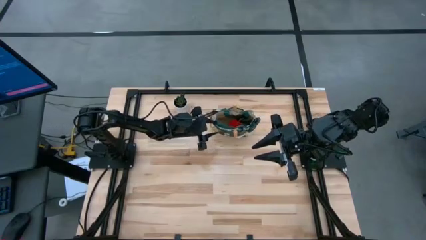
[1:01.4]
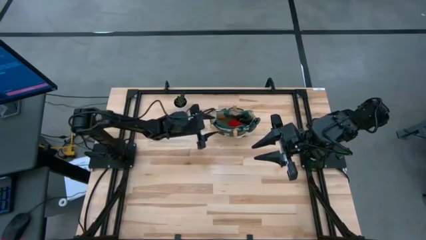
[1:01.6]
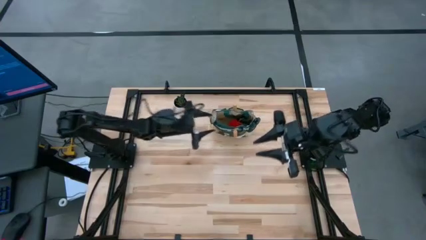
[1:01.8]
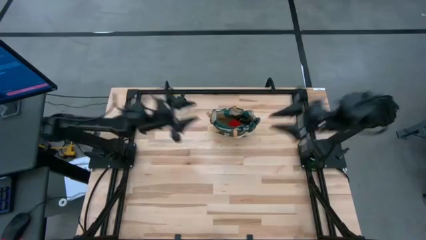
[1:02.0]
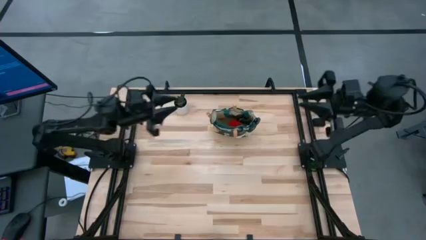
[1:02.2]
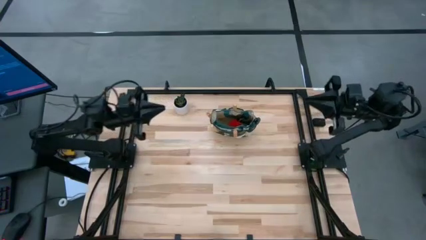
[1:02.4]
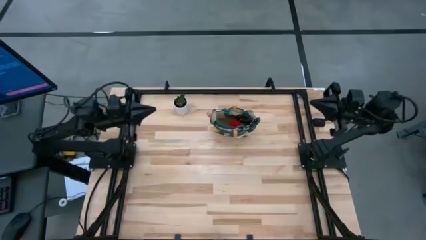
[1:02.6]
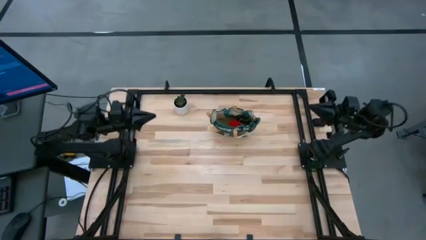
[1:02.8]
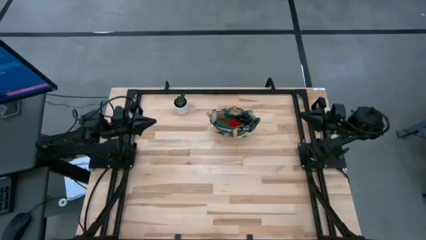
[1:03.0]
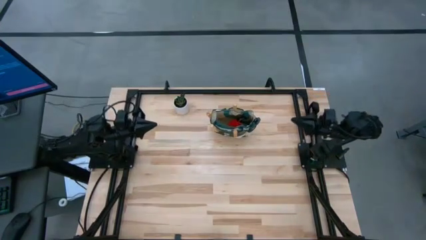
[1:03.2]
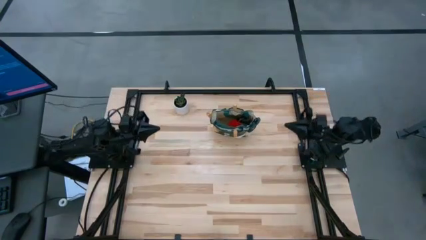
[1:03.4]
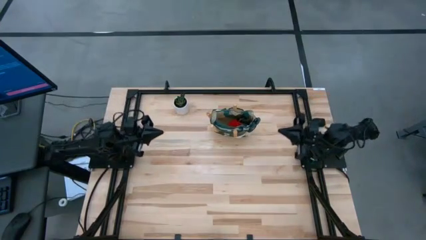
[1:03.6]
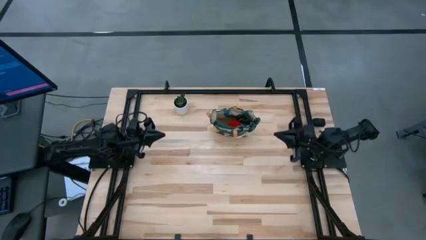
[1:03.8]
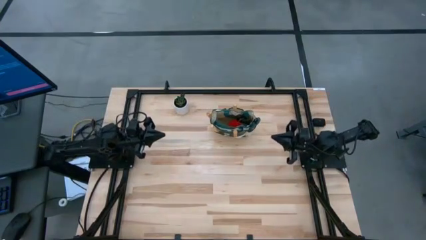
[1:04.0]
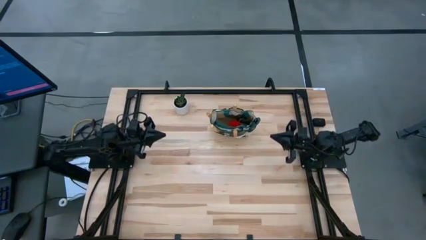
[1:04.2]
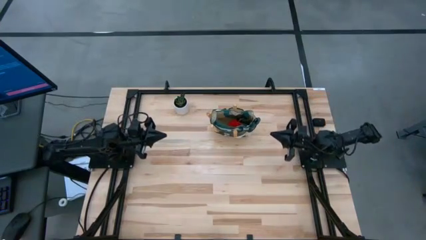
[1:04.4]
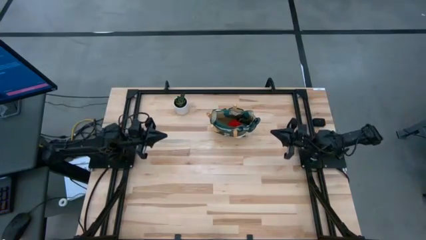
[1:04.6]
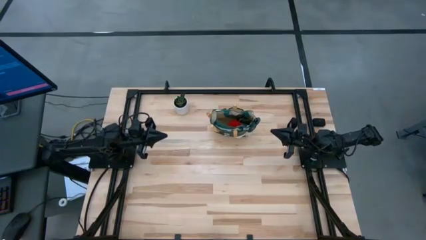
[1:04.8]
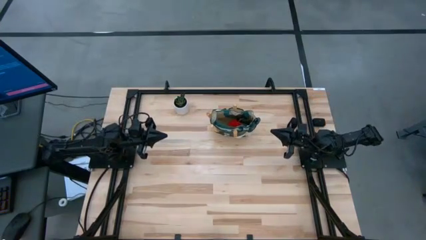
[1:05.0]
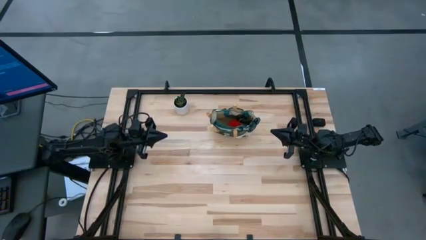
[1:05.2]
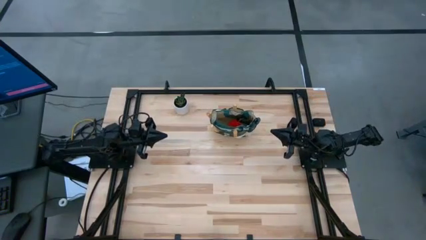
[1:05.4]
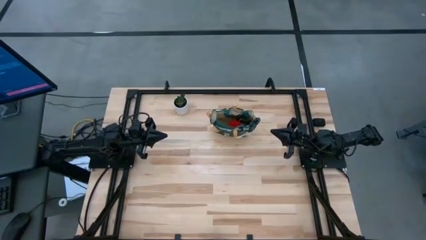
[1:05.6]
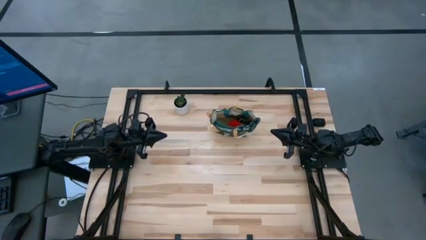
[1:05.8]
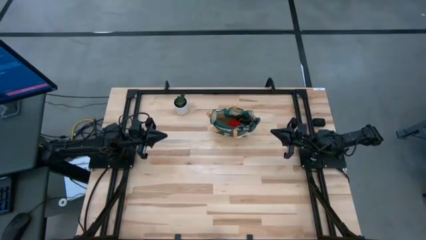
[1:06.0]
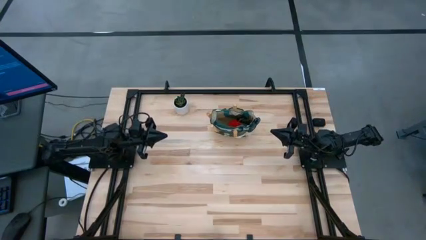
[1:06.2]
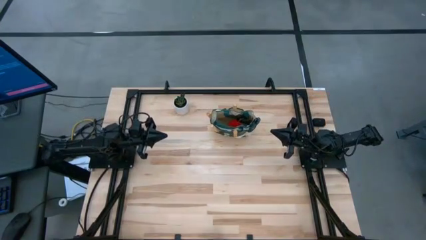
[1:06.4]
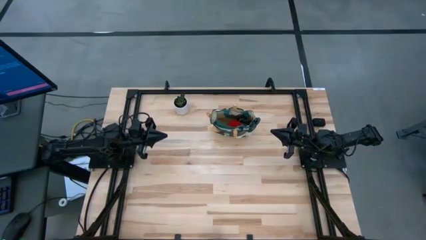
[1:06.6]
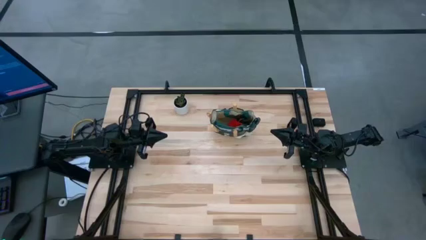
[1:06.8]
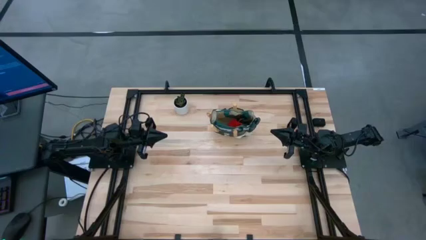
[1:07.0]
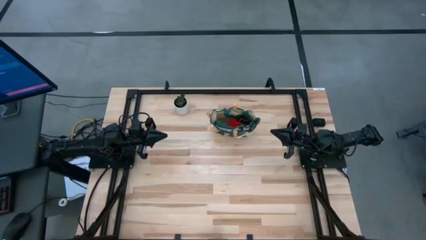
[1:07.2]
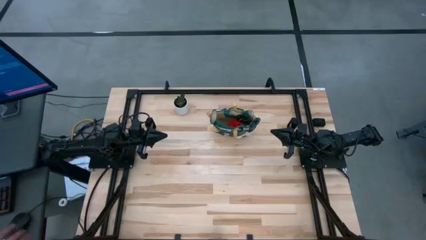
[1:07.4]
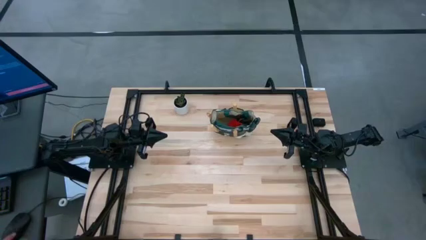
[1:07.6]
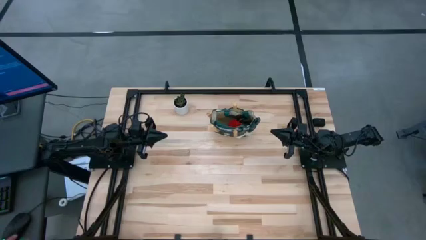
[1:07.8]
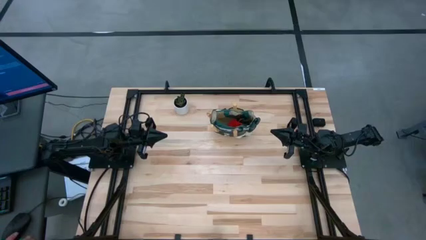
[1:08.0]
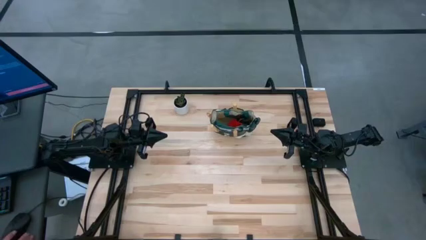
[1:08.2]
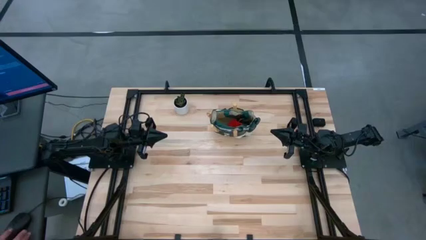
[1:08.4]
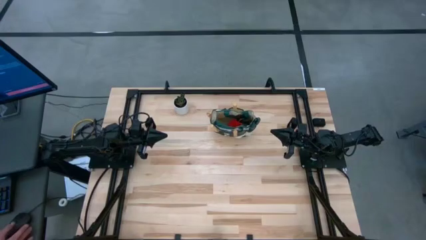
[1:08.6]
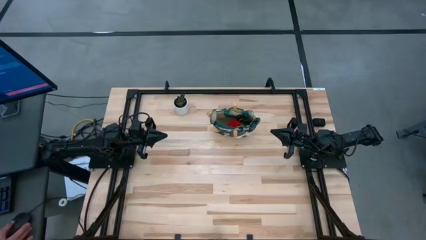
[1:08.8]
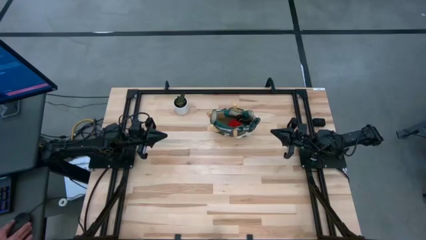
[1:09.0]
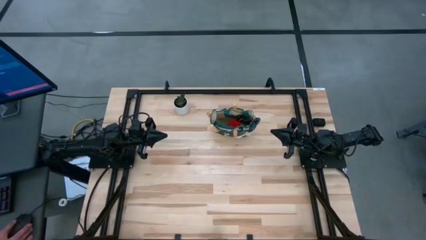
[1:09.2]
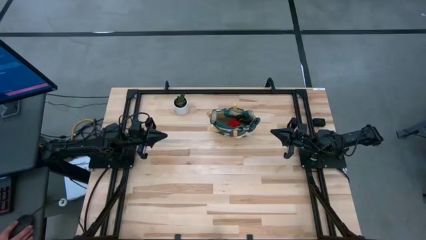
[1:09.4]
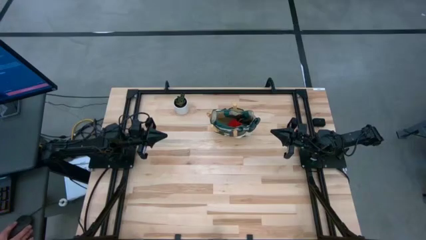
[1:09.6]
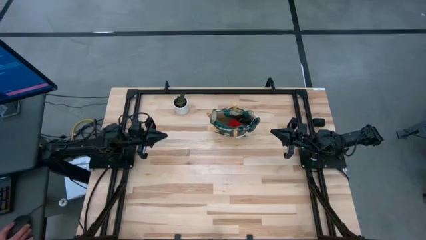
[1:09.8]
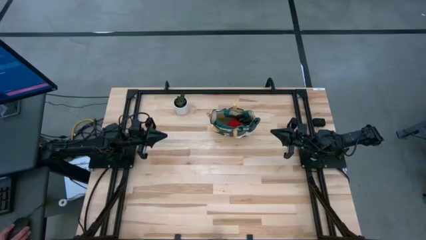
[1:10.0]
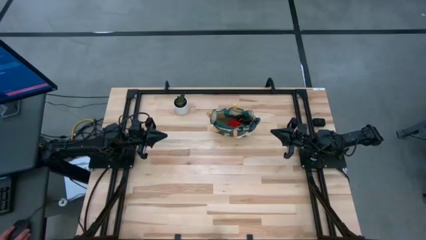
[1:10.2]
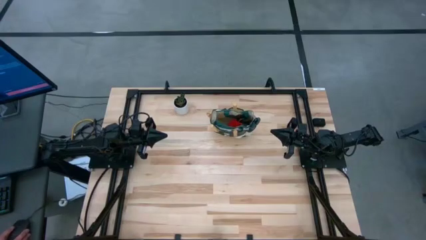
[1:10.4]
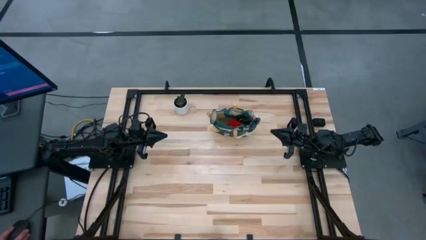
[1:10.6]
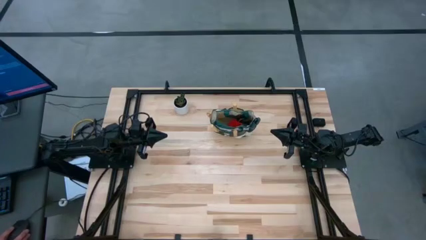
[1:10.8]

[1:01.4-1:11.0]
Task: Pick & Place Garden tools in Gardening bag
Return to Home Position
